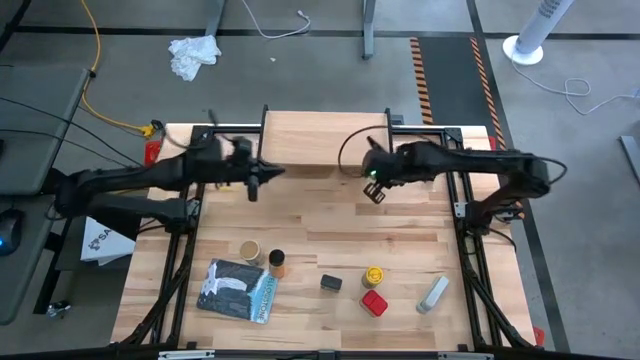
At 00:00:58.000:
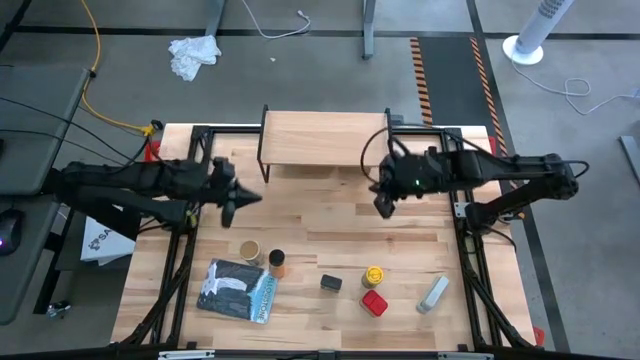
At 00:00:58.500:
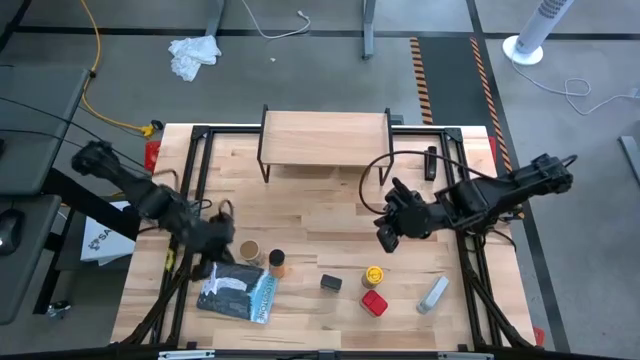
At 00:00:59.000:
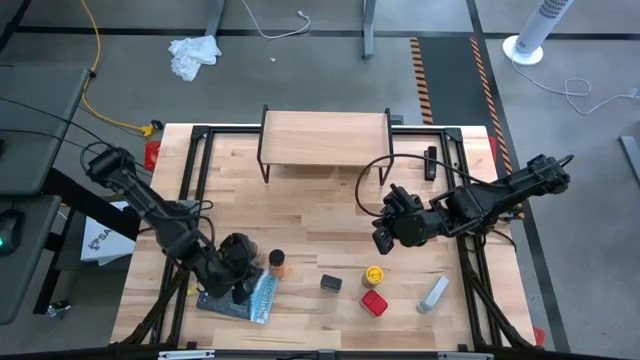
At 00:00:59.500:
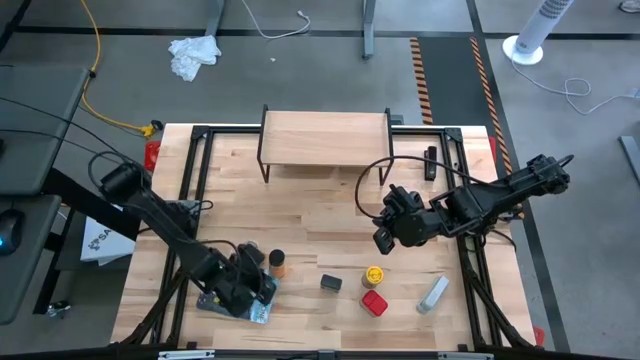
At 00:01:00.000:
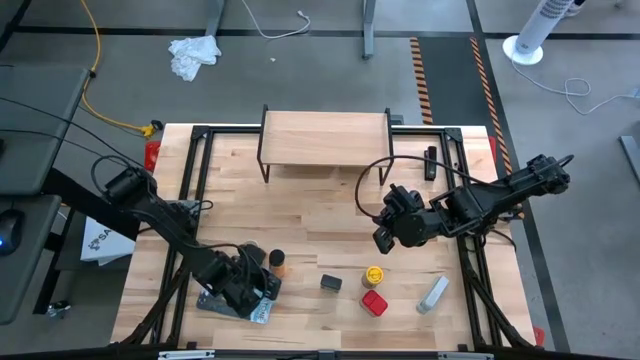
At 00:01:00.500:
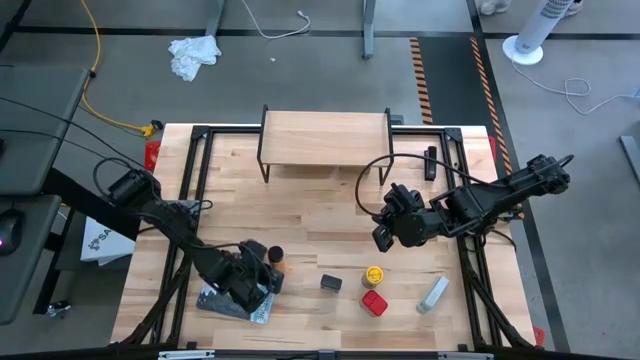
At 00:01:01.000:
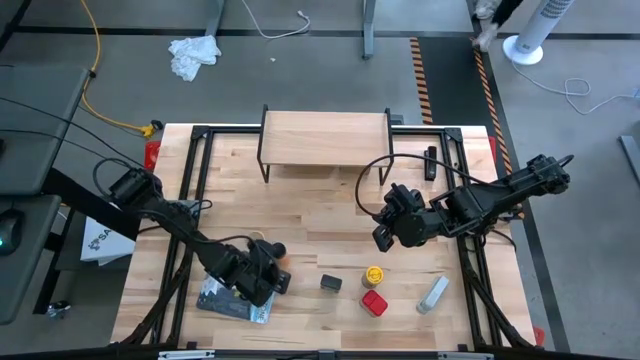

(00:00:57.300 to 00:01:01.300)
Task: Shelf spices
Adjust the black seasoning bottle

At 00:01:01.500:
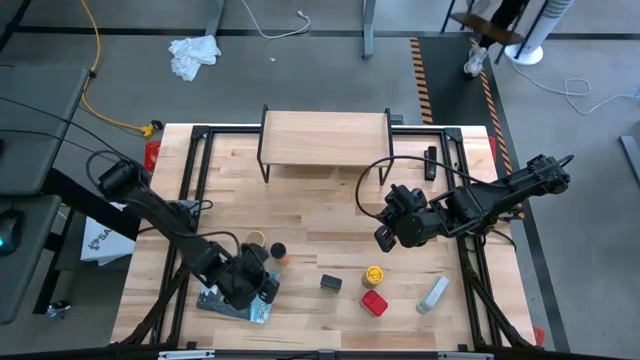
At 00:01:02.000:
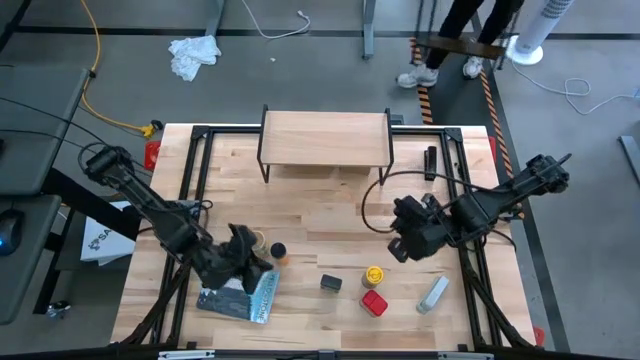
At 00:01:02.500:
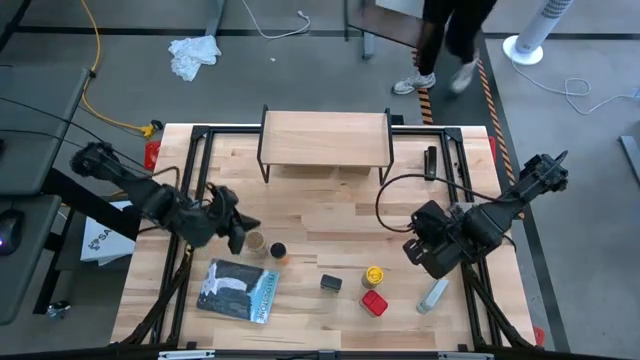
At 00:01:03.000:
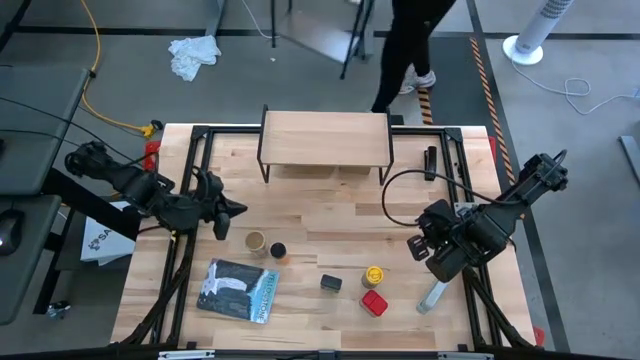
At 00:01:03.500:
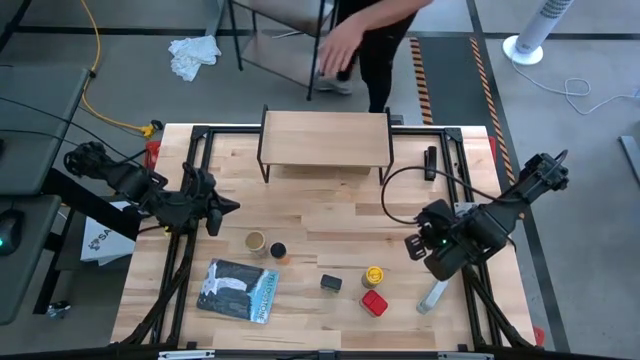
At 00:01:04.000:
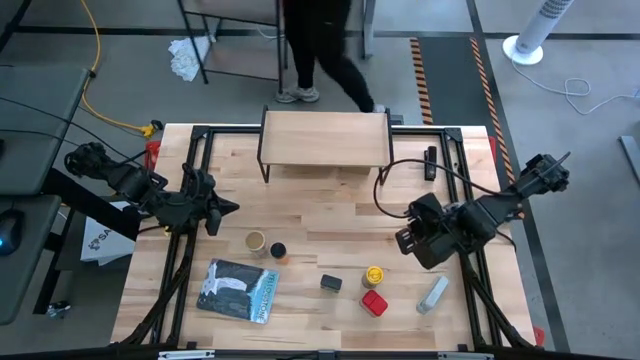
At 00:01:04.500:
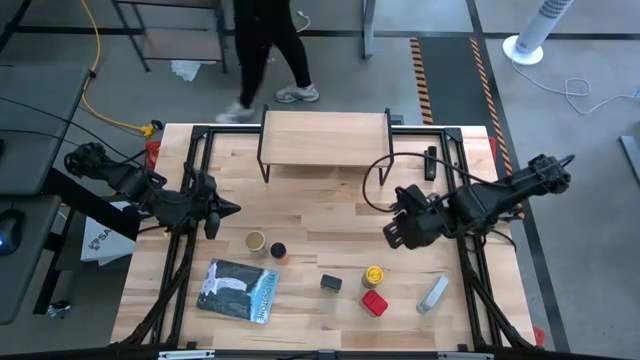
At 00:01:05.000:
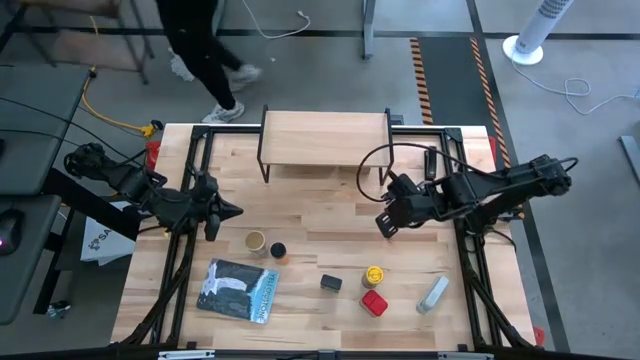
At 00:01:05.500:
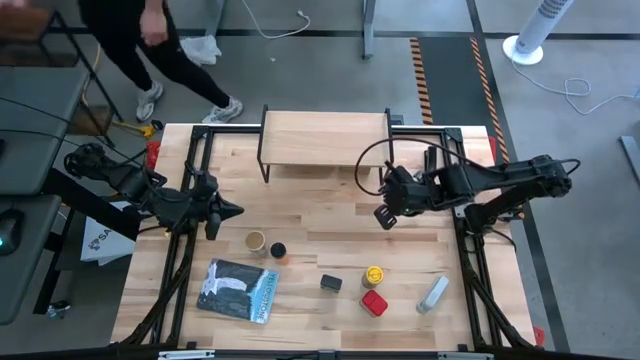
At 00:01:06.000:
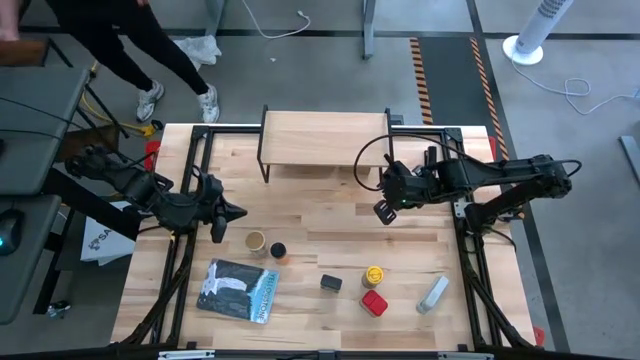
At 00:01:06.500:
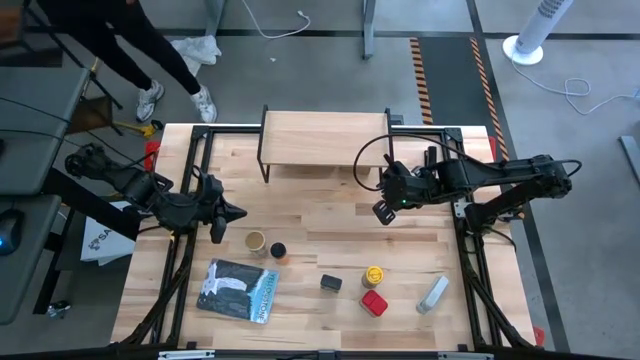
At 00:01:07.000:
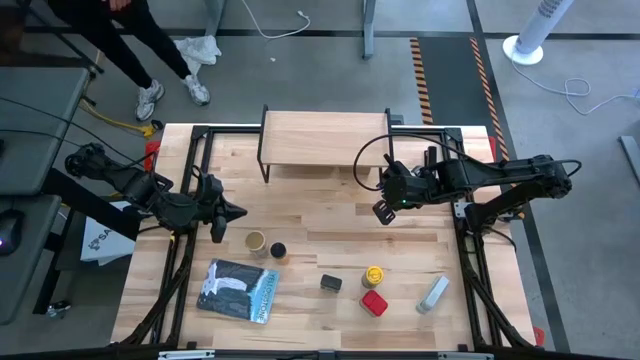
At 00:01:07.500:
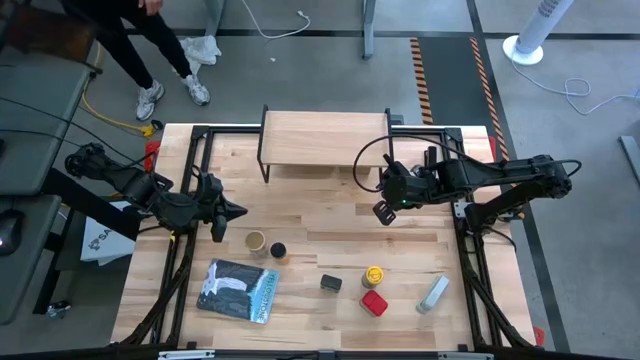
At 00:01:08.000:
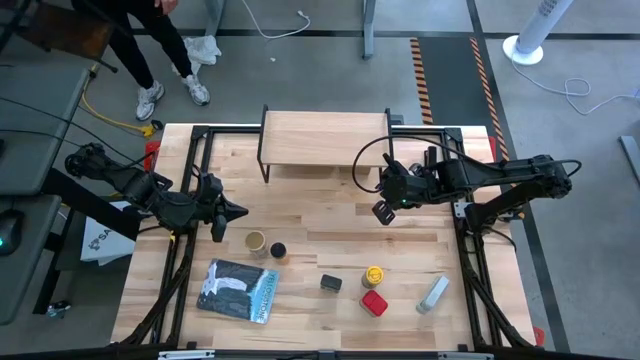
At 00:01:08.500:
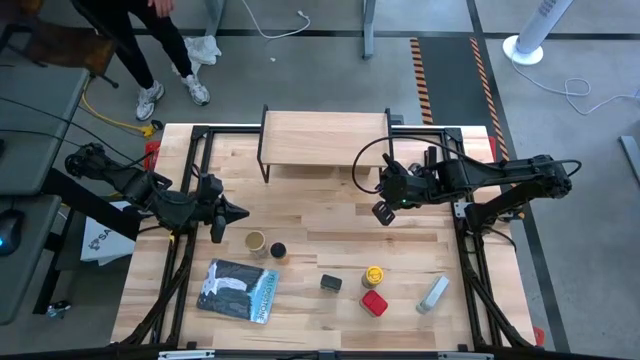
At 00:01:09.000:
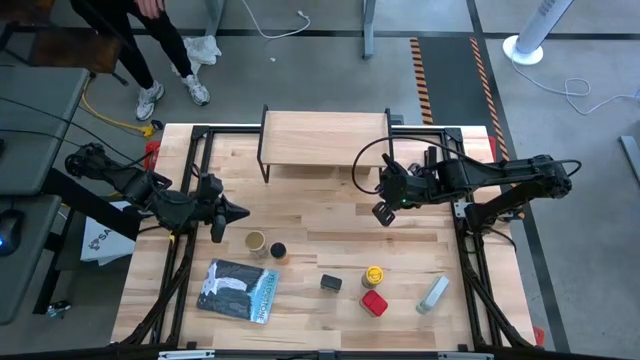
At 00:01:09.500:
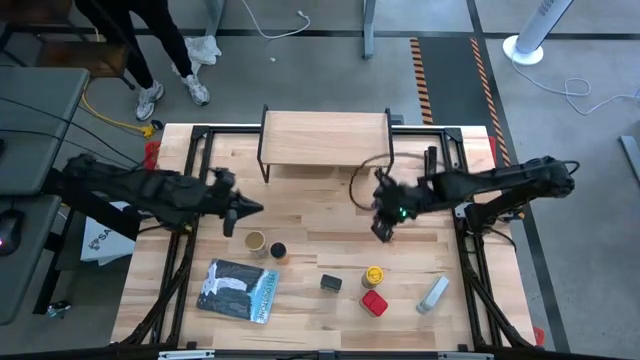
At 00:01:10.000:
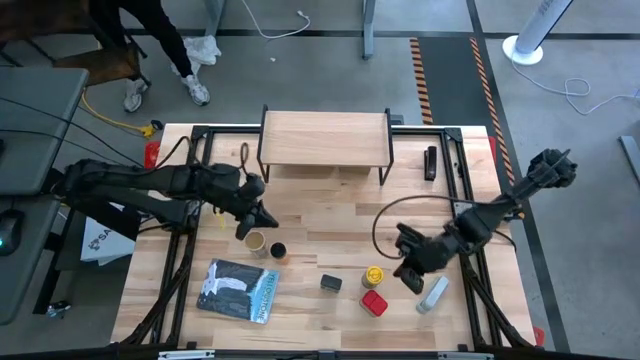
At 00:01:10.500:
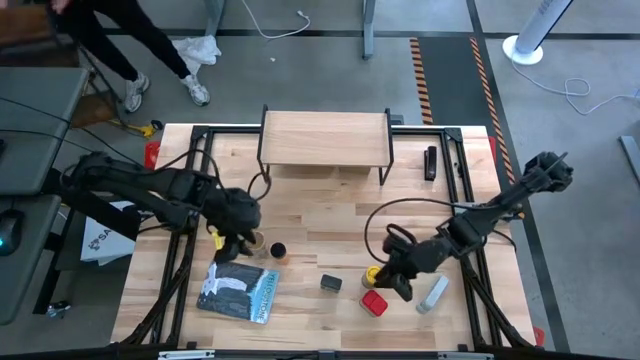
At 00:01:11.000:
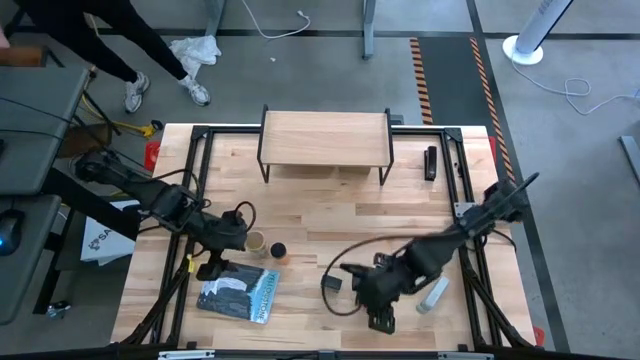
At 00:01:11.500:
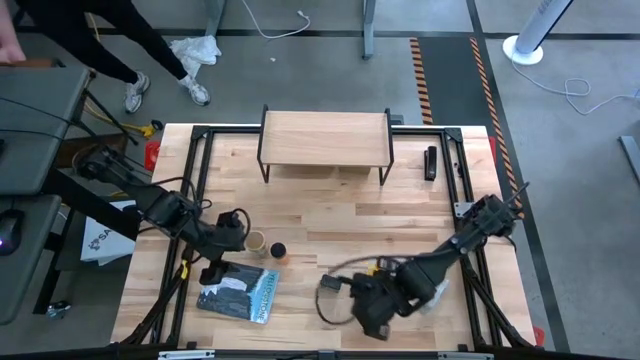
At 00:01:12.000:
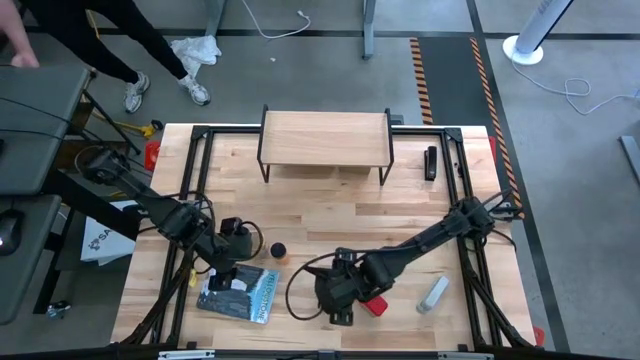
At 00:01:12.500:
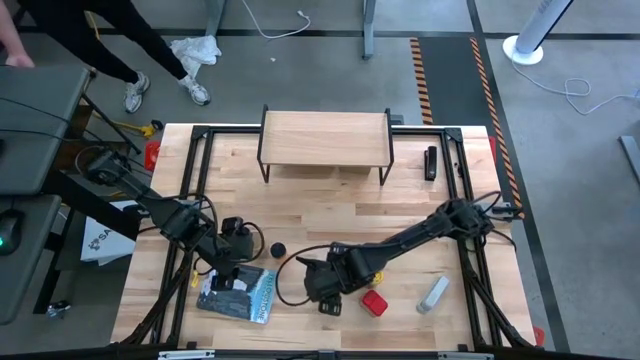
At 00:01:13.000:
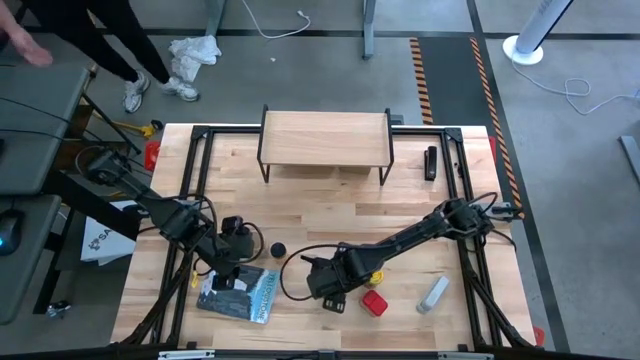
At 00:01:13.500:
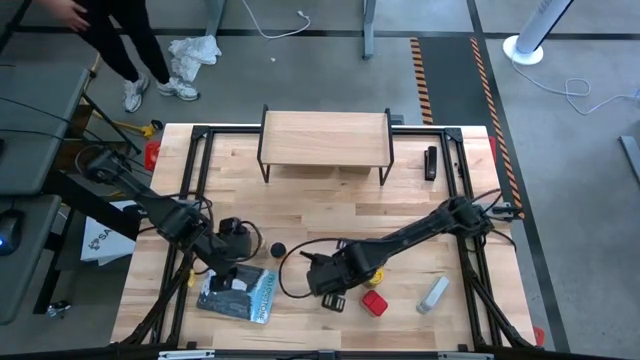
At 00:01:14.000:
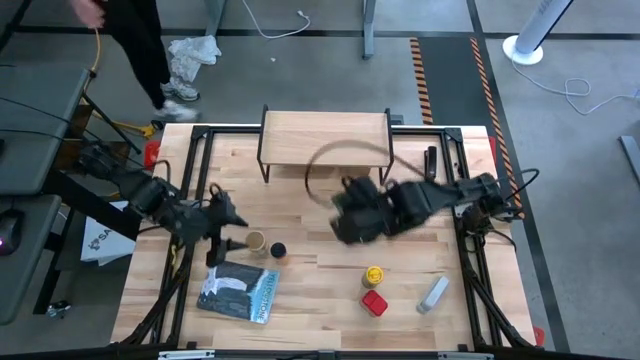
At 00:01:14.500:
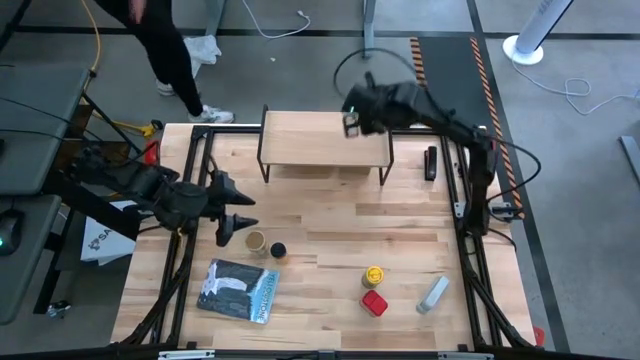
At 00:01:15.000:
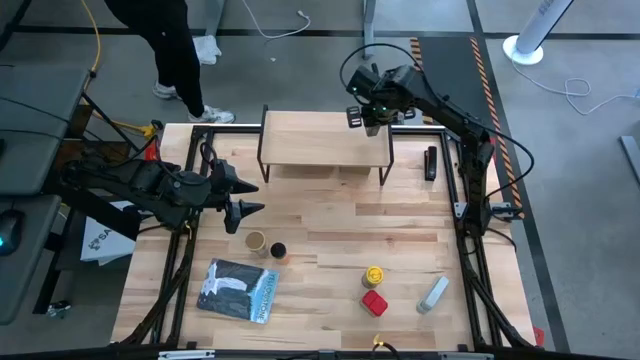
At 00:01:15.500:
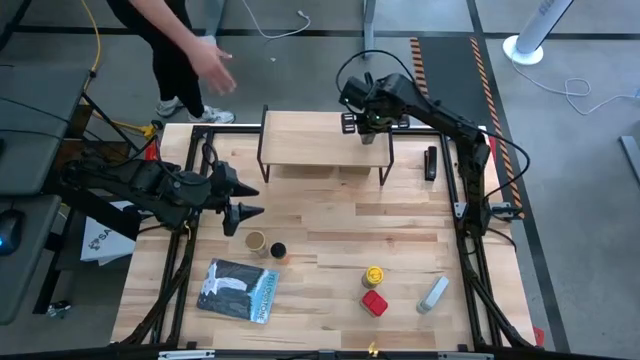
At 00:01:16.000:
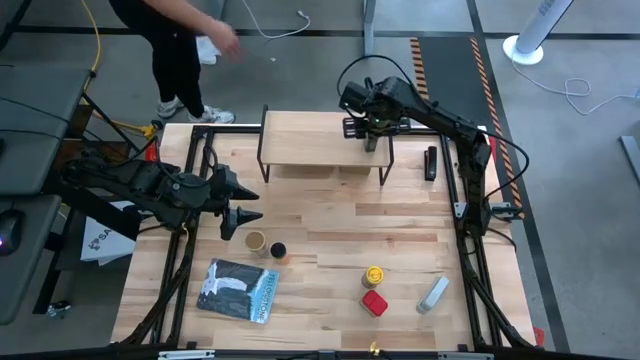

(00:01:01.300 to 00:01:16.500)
Put the green seasoning can on the shelf

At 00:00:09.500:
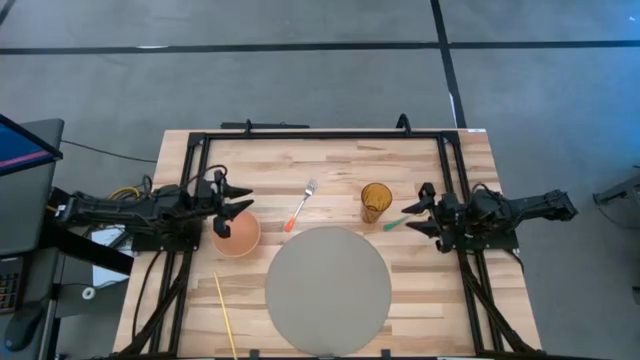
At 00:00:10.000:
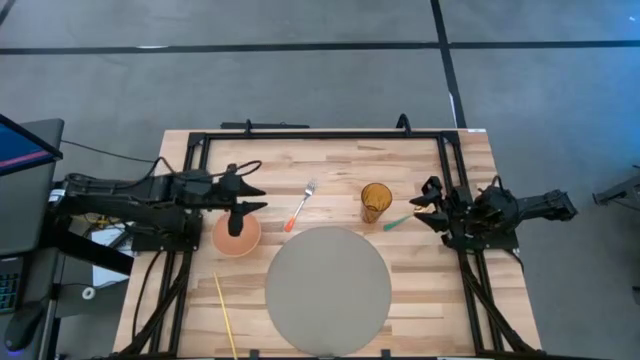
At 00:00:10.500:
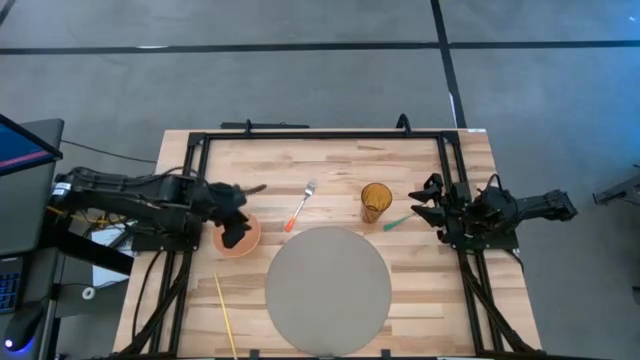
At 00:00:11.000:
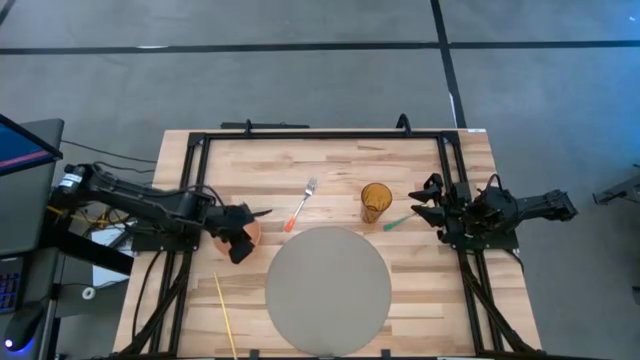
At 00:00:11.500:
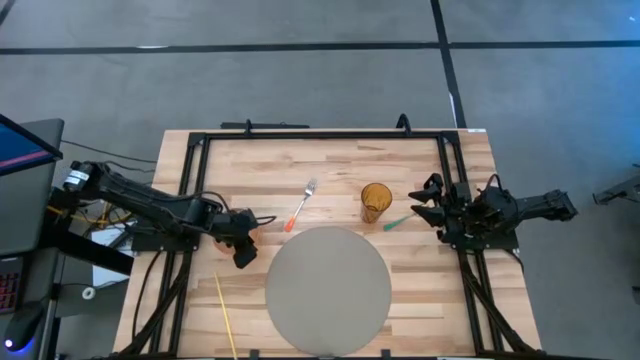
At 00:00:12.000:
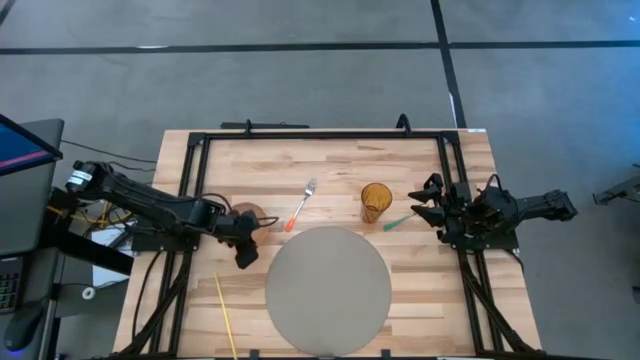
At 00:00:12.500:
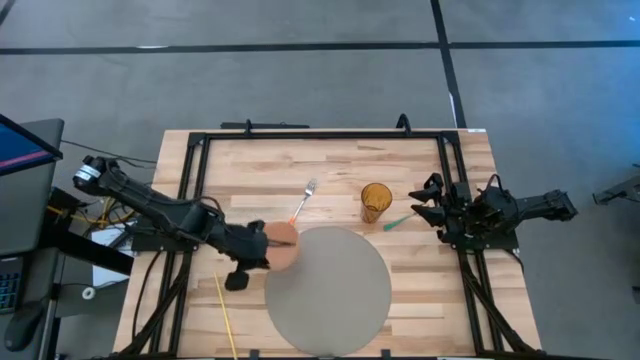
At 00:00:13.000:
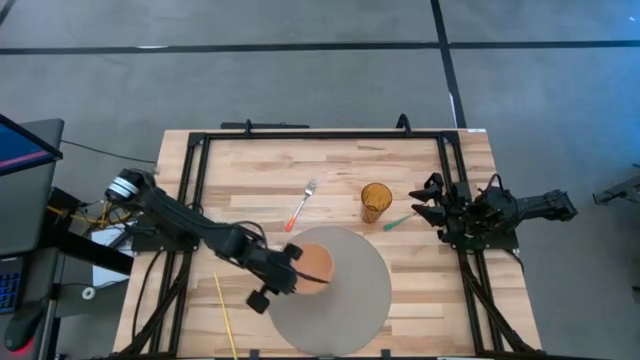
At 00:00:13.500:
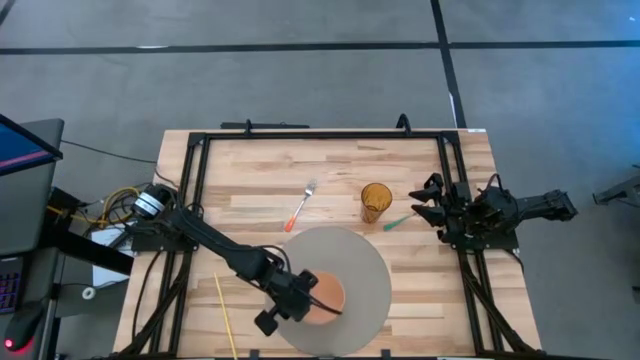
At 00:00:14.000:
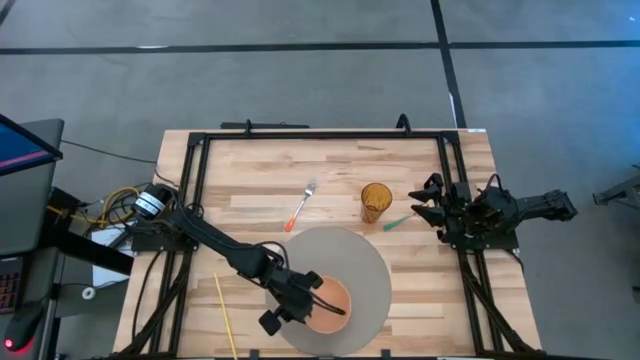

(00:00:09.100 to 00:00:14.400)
Task: Pick & Place Utensil
Put the orange bowl on the gray mat
